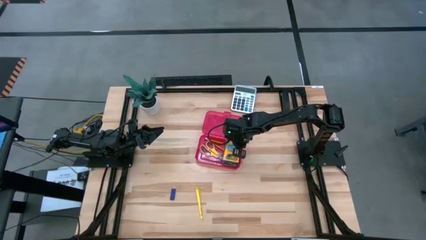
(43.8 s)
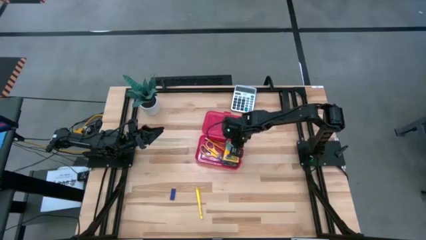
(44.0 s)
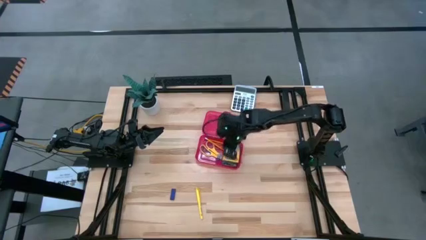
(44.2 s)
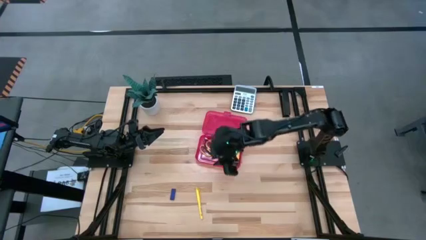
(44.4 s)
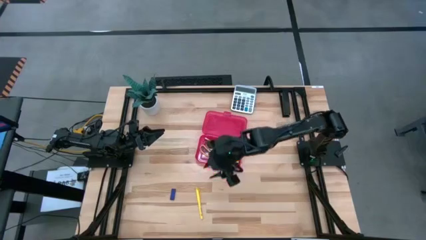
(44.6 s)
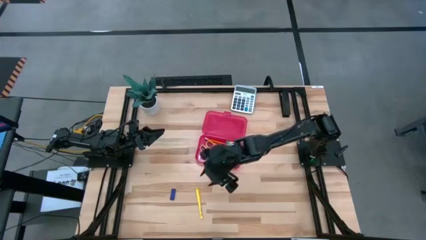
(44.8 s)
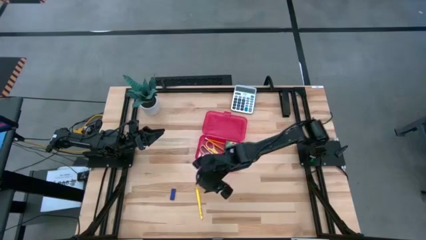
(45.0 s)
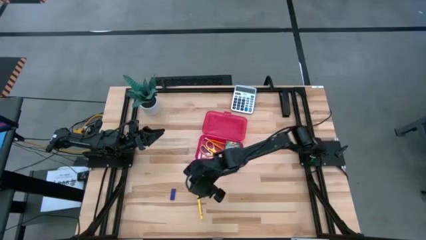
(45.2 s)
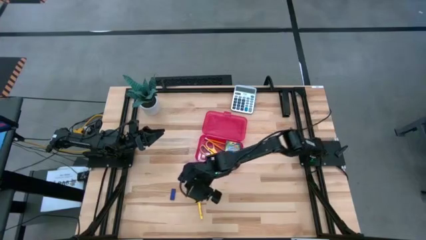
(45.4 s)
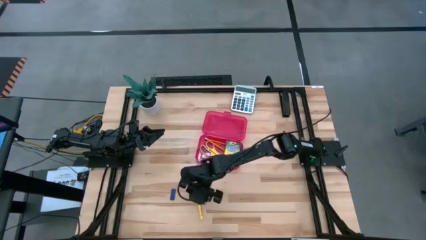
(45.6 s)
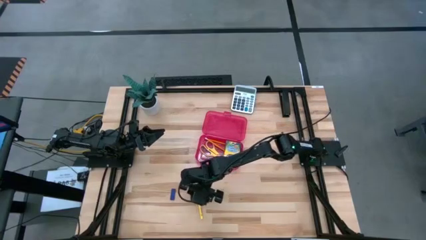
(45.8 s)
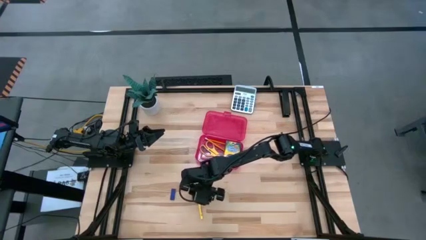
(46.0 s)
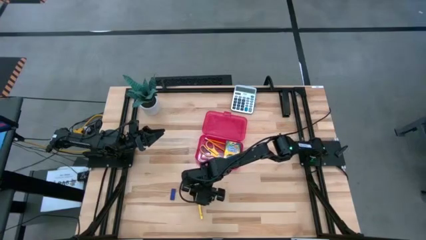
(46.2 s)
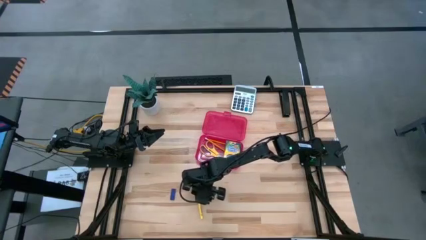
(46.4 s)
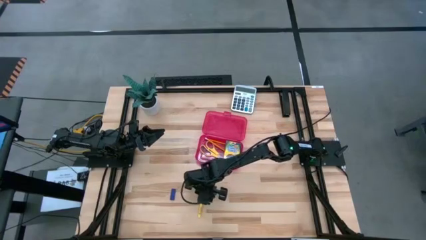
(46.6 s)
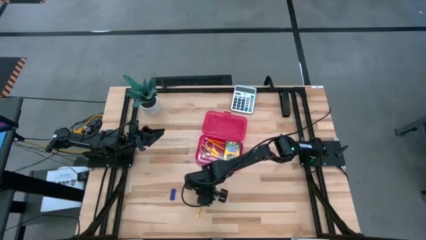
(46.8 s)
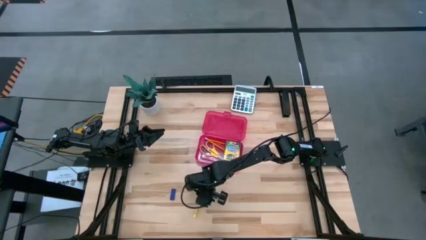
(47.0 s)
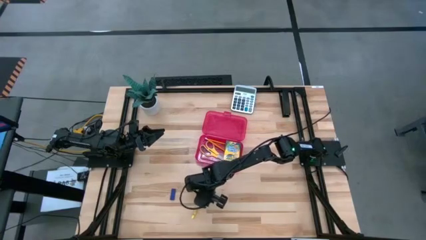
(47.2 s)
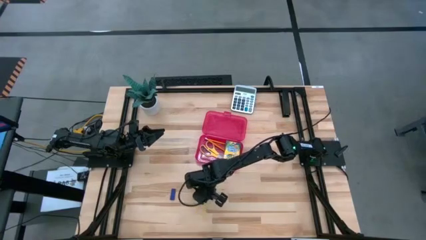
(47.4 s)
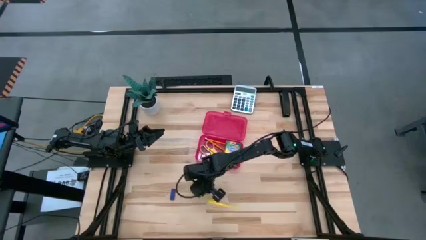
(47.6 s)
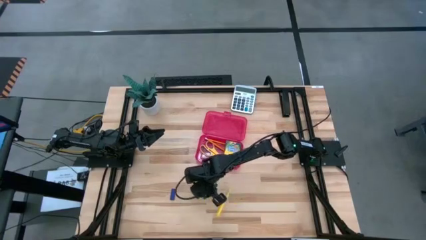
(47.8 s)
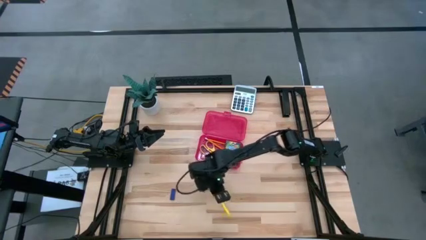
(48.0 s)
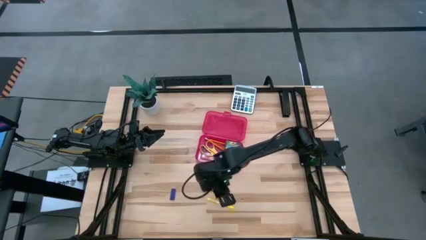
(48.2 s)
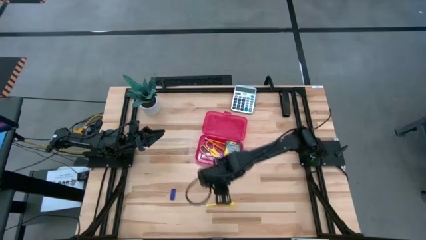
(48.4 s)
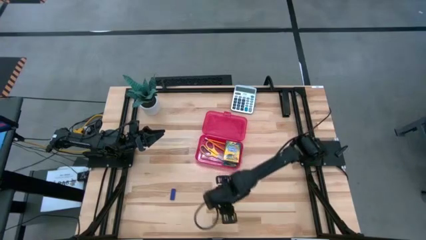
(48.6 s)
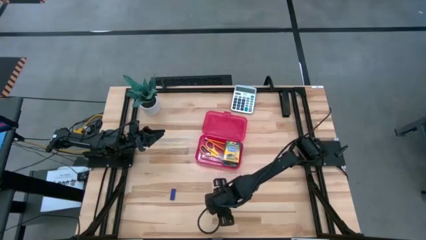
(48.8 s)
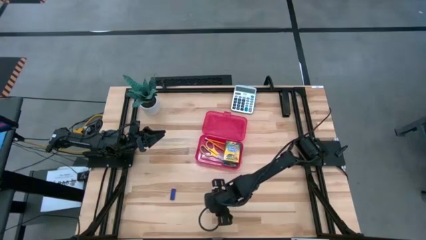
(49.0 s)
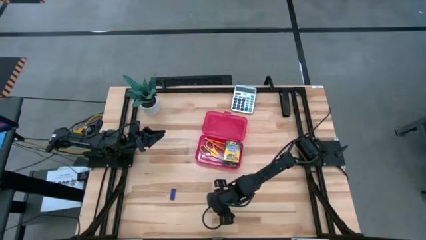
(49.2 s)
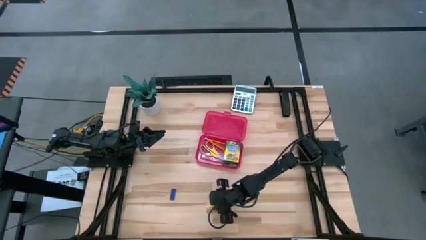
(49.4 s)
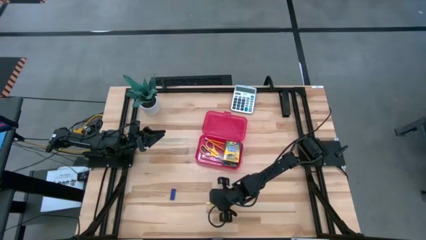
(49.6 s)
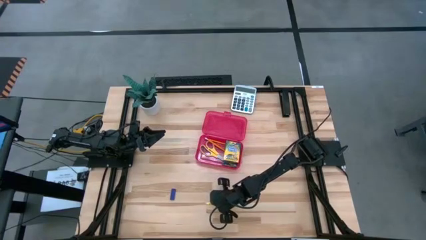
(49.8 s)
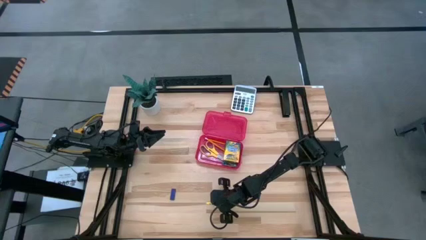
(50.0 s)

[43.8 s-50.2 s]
Task: Pack school essentials
Put the yellow pen into the red supply box

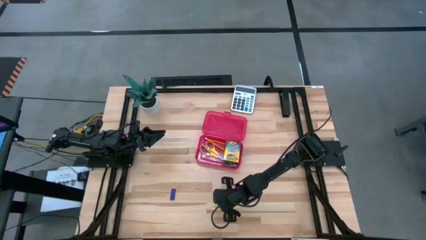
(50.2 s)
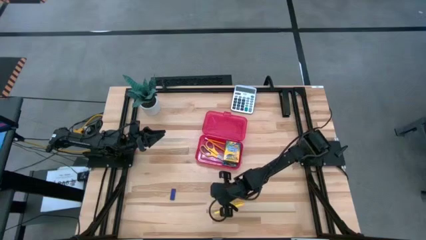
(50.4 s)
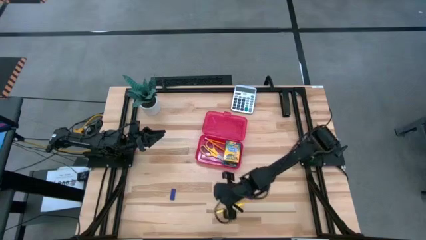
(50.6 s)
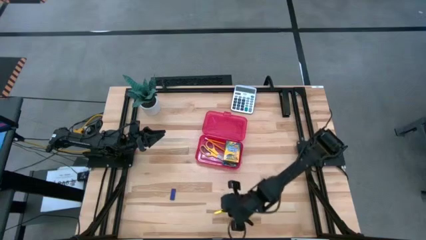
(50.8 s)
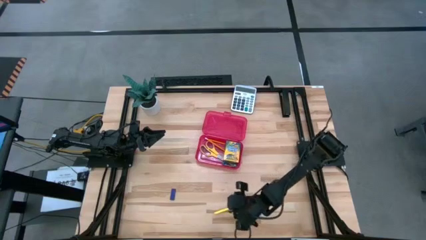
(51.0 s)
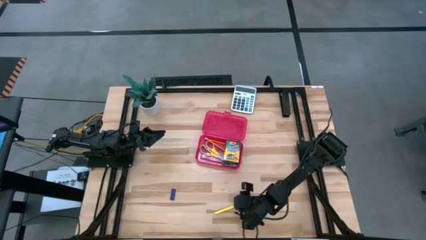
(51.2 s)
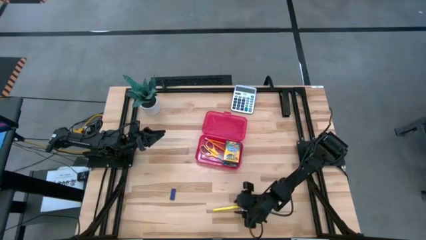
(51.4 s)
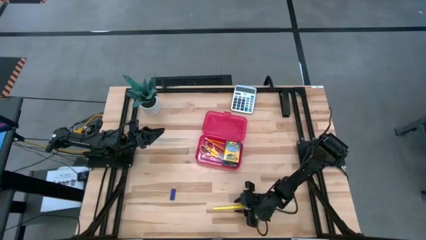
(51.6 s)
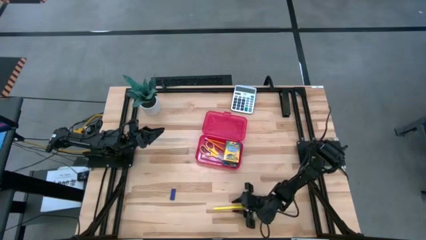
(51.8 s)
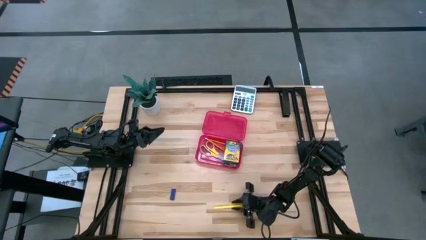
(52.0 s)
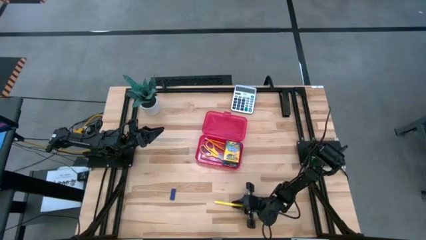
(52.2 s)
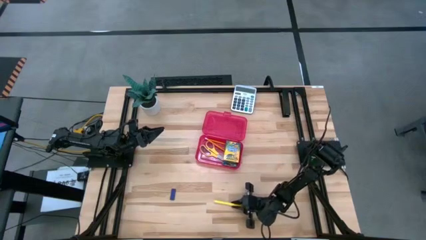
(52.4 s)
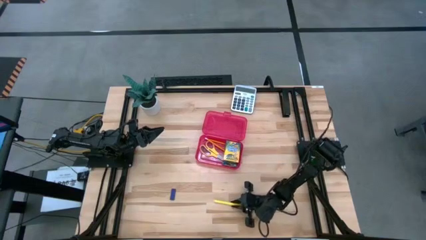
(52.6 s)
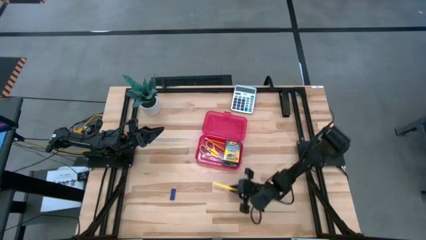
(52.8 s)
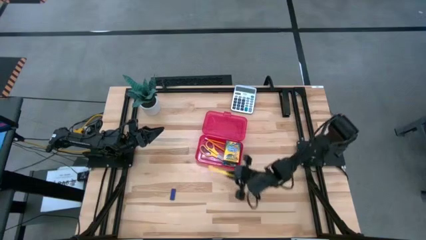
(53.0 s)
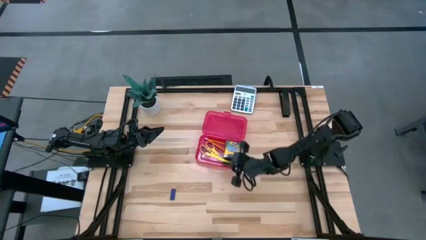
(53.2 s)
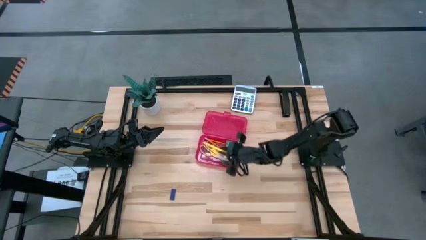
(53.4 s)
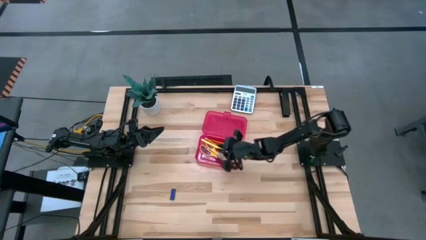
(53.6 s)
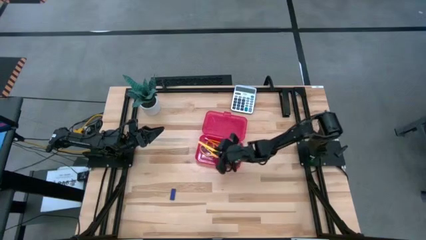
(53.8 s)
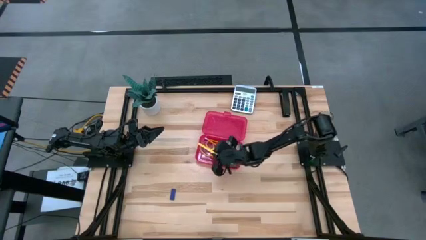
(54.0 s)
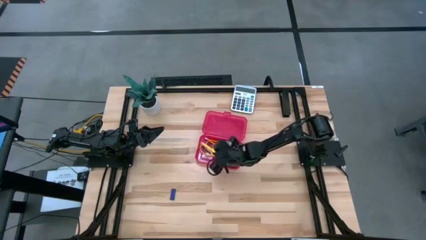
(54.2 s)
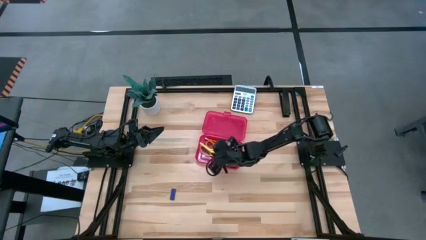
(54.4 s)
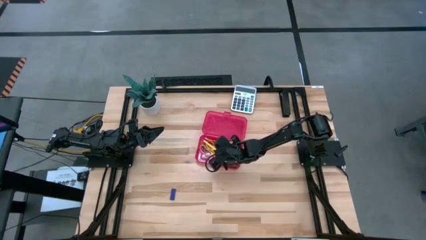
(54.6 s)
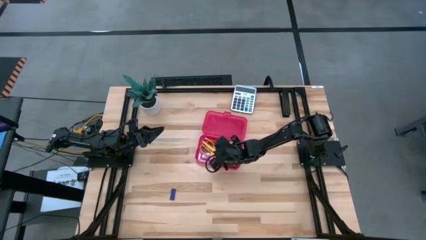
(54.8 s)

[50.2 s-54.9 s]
Put the yellow pen into the red supply box

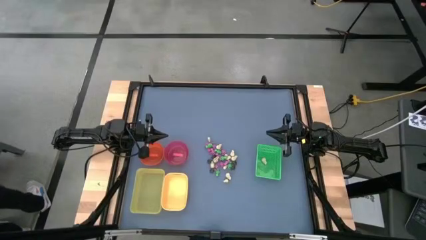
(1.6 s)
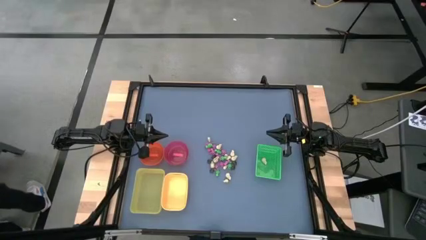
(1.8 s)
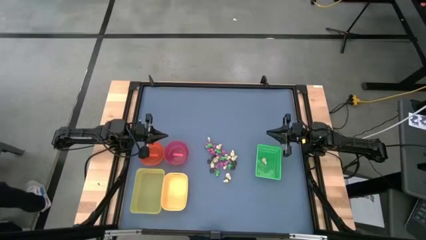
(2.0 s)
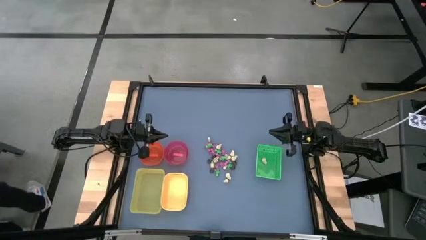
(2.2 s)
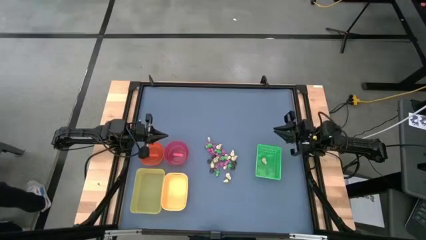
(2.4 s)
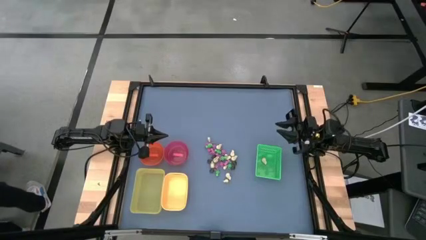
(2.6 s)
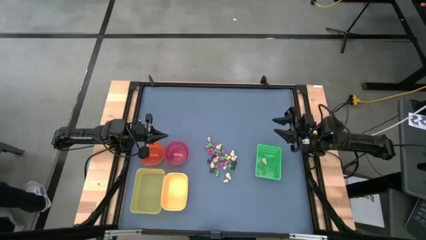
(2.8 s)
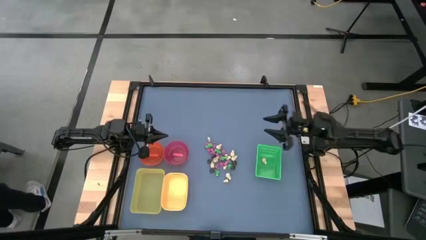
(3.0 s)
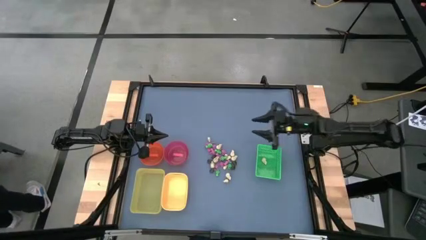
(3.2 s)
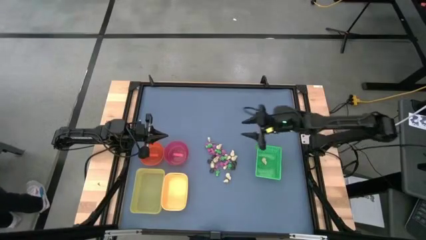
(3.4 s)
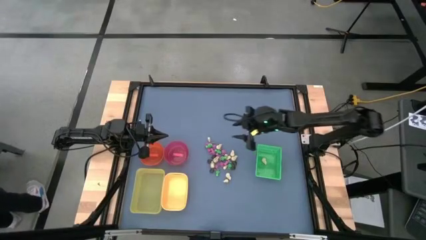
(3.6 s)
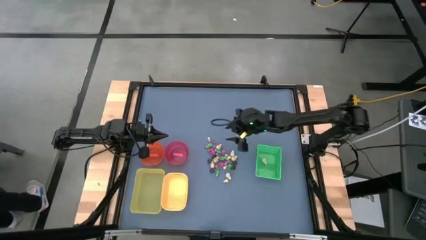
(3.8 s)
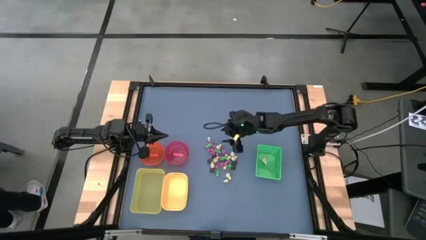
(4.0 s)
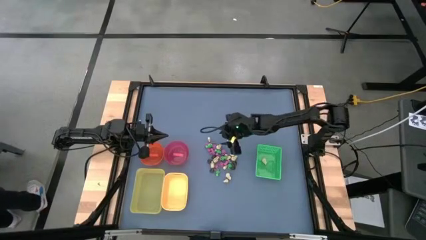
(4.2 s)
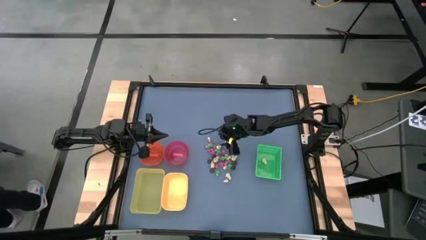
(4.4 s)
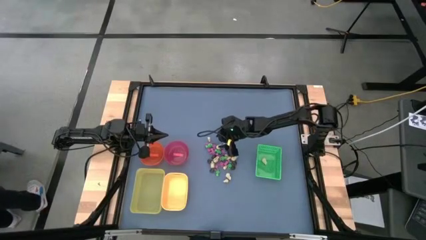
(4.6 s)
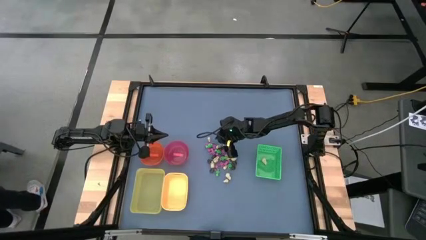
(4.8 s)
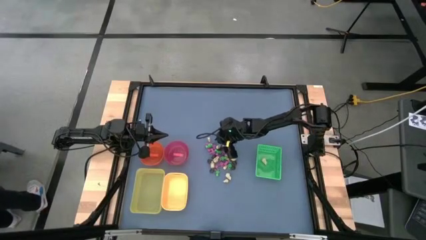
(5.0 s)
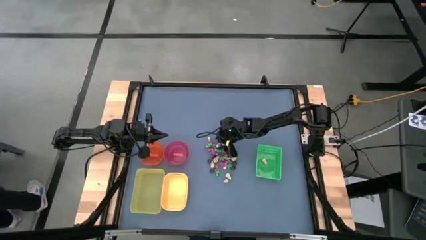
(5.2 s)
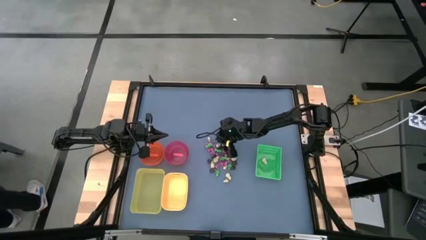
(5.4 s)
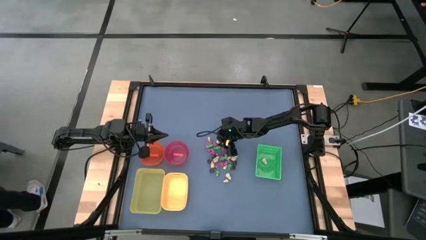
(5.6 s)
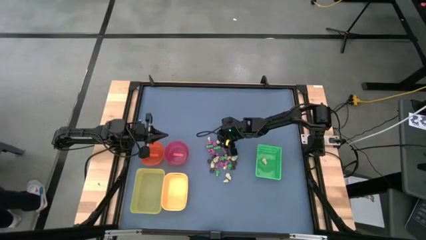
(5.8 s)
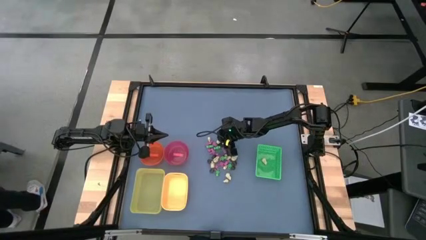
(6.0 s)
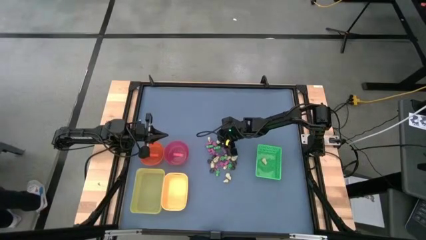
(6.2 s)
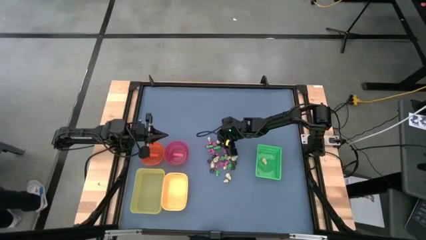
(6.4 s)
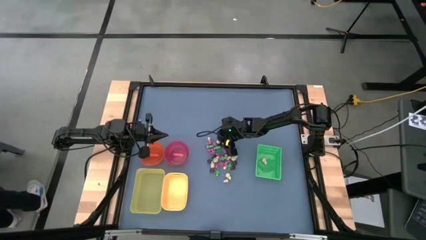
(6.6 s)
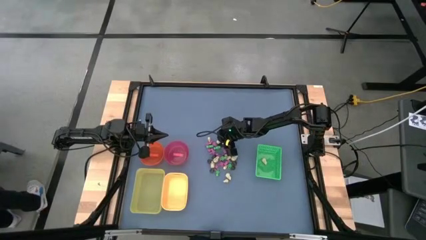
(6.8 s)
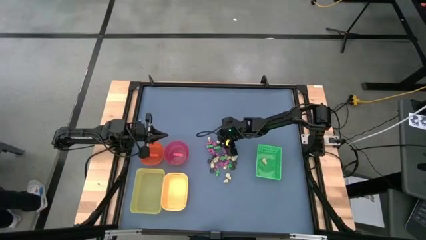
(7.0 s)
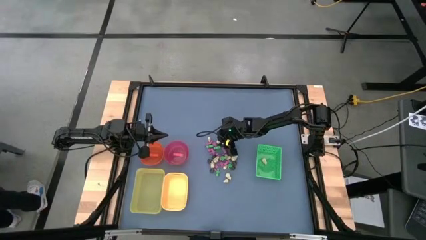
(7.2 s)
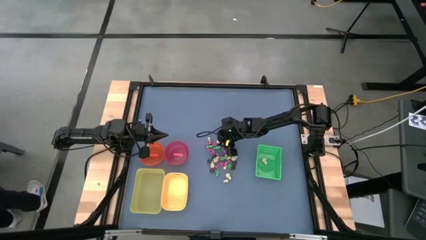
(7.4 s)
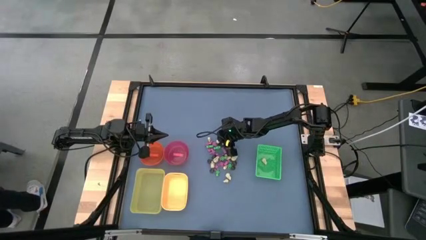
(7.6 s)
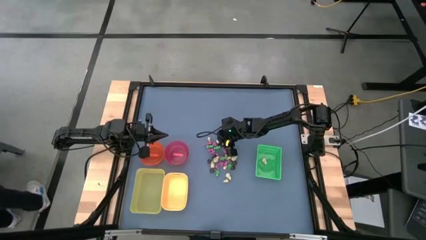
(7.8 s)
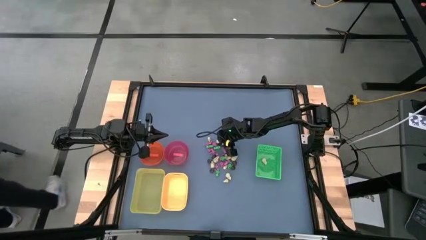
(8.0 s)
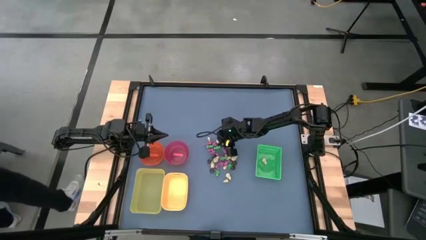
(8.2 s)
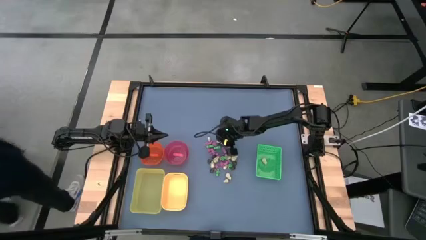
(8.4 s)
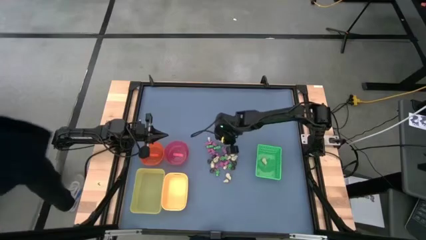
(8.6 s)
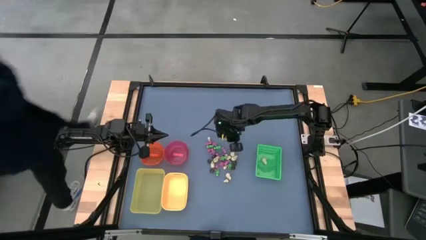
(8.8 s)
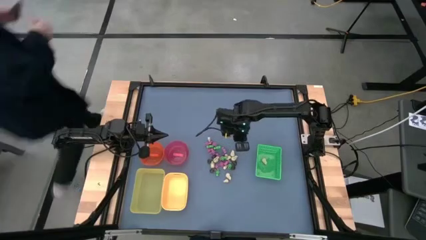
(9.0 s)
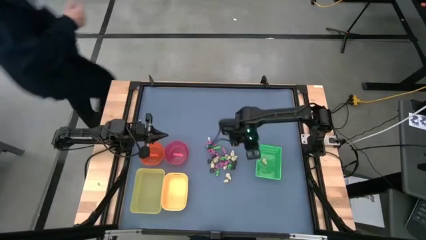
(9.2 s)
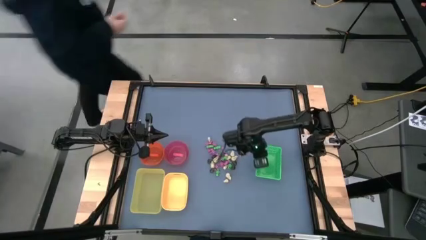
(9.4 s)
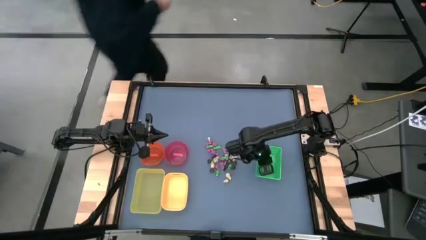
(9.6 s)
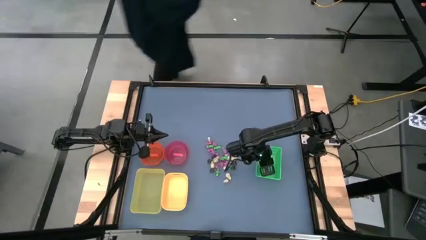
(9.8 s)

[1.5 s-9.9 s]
Task: Sort Halloween decoration
Put the white skull toy into the green bin
